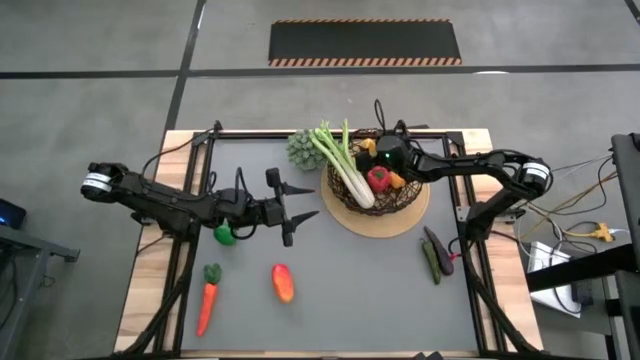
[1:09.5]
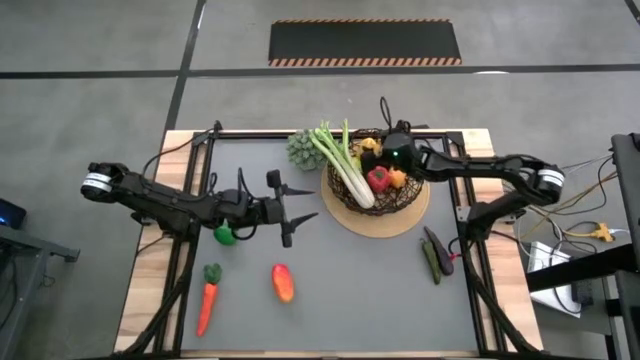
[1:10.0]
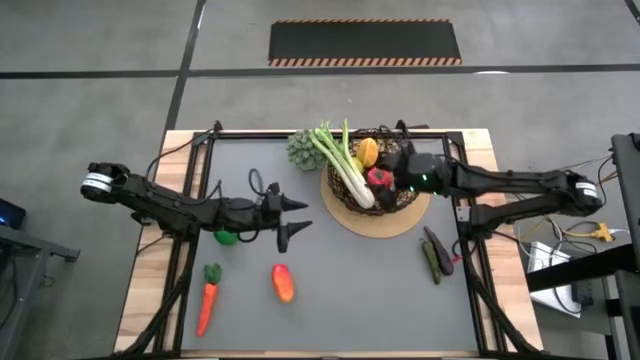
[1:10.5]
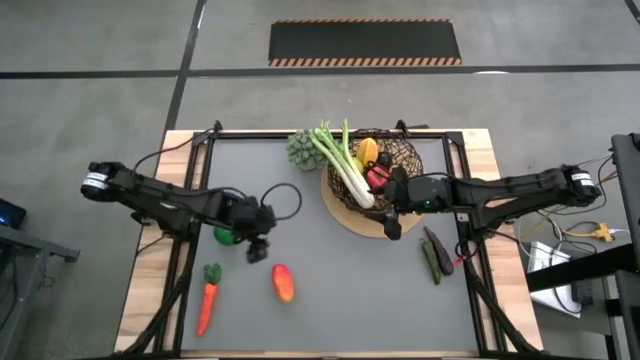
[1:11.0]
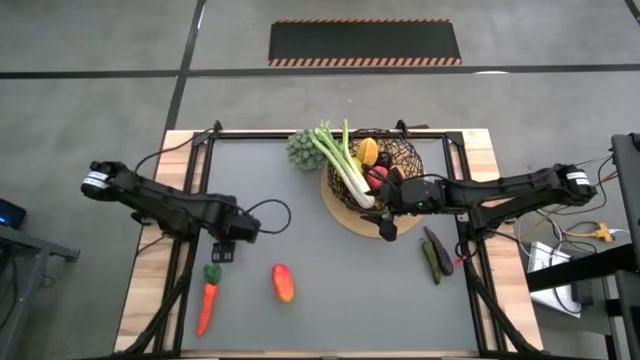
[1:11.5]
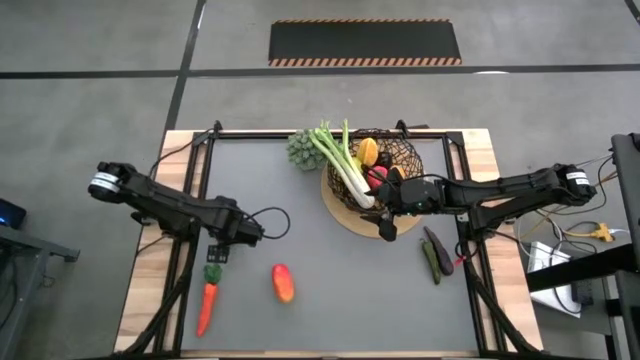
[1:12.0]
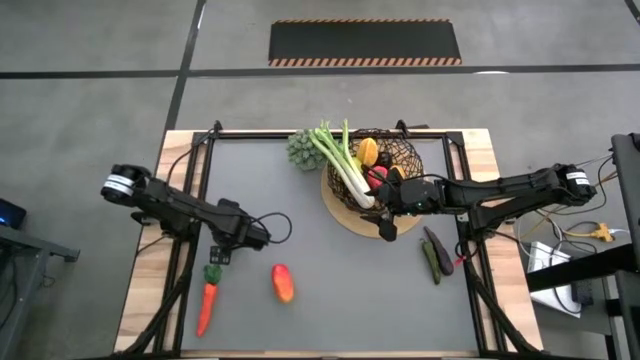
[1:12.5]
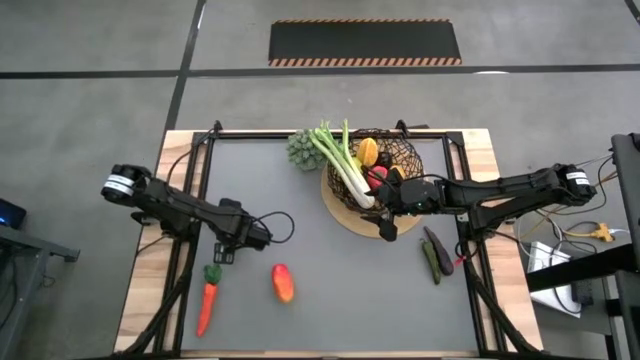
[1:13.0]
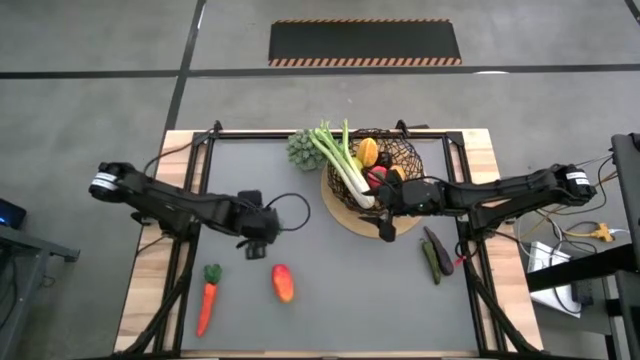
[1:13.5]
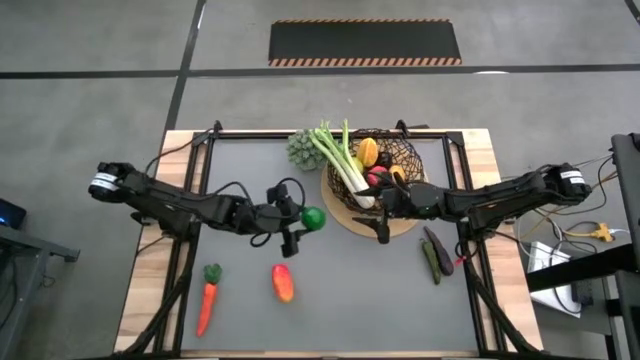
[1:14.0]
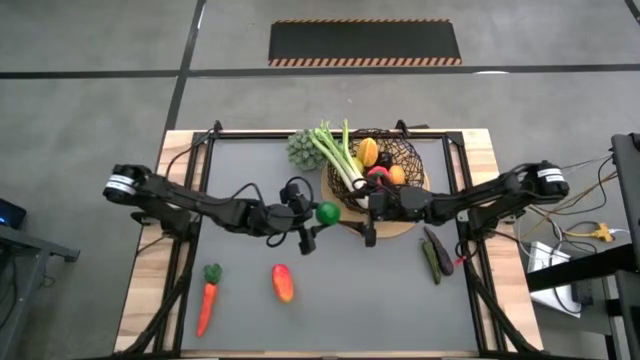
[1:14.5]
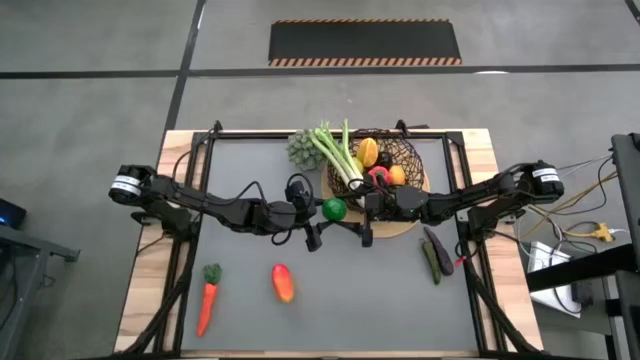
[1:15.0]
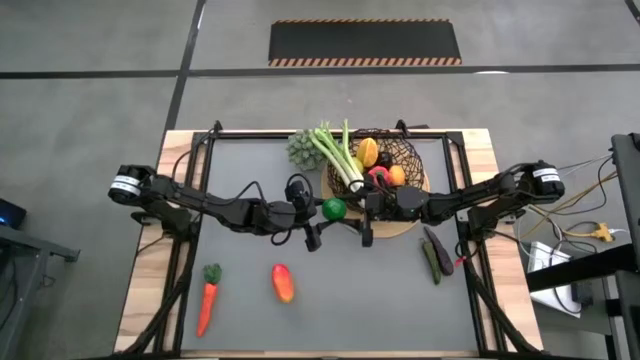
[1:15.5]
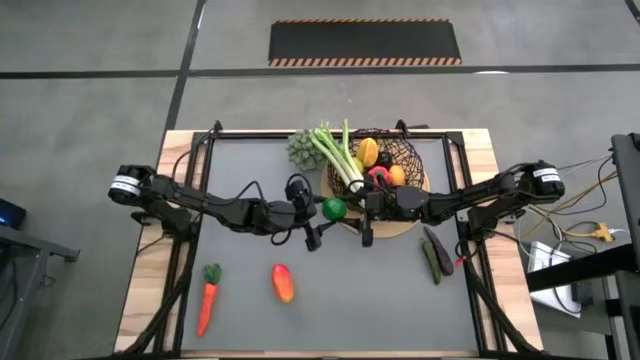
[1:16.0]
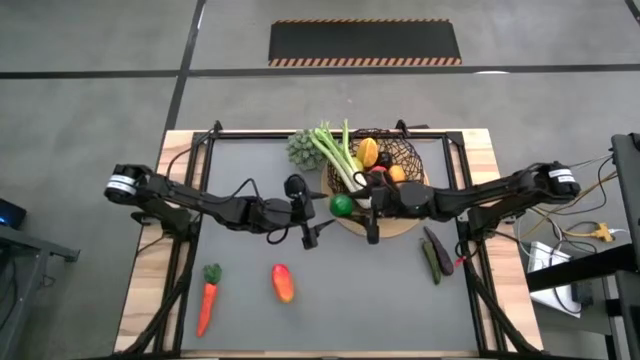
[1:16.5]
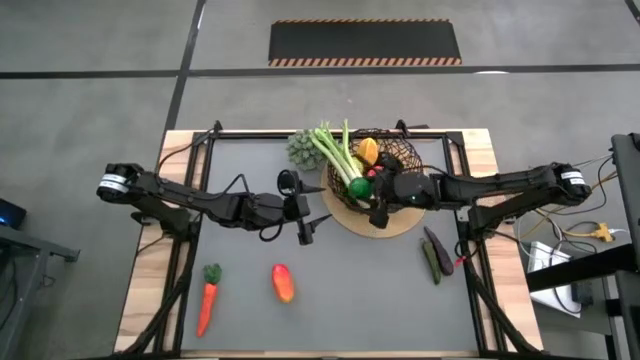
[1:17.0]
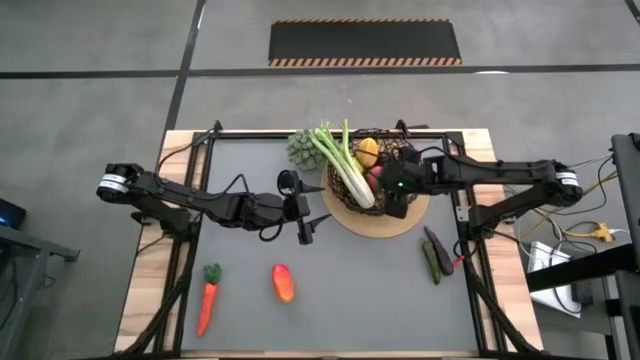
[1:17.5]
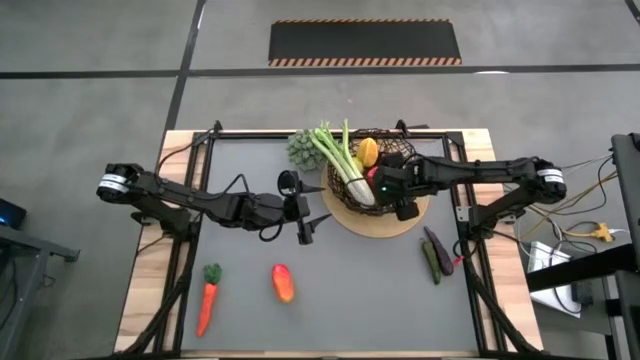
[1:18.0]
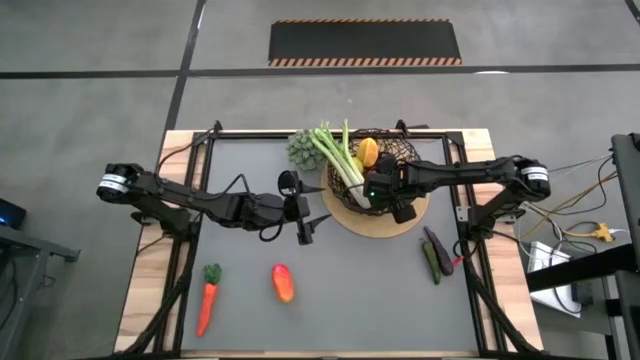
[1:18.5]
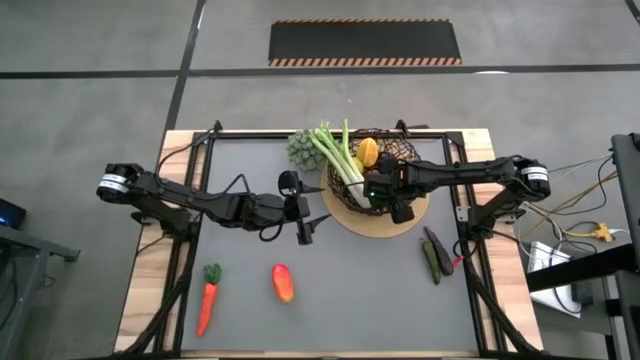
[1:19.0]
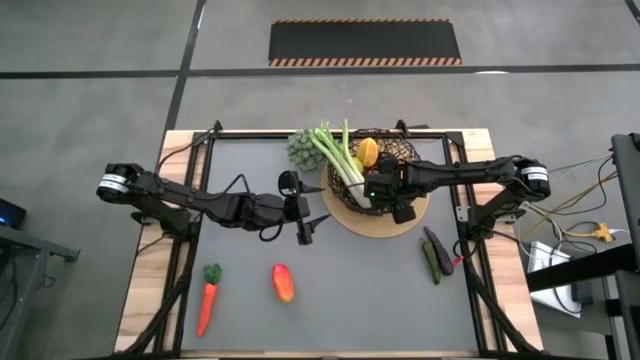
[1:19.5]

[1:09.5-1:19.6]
Task: Build produce basket
Put the green lime into the black wire basket

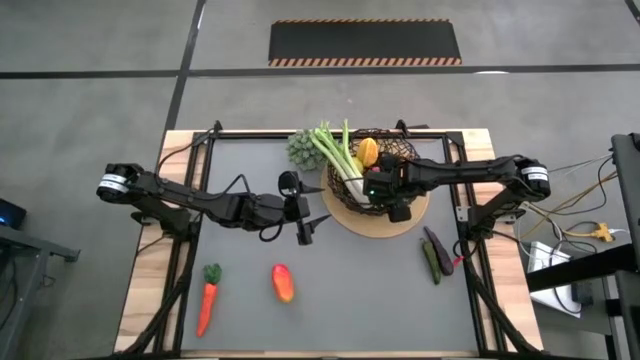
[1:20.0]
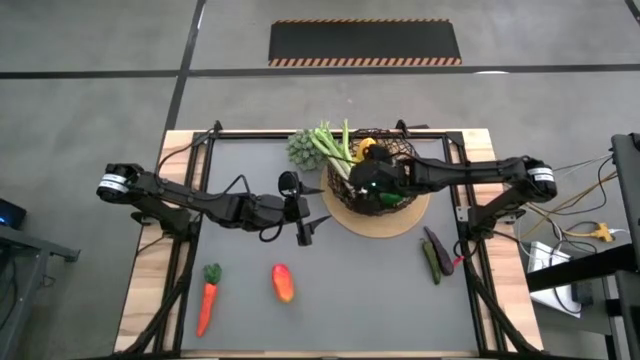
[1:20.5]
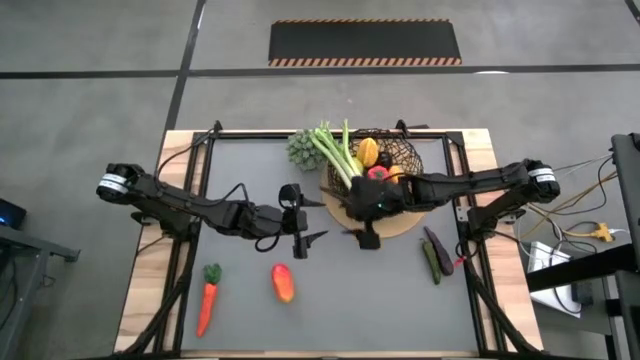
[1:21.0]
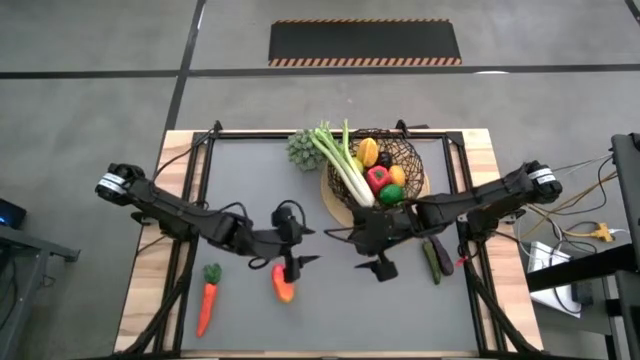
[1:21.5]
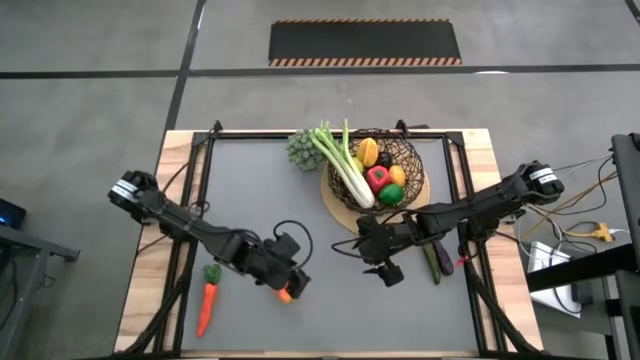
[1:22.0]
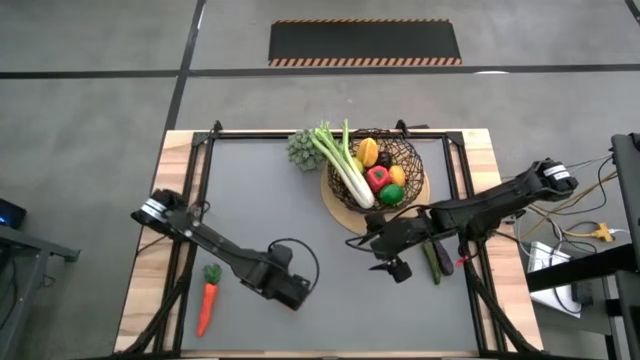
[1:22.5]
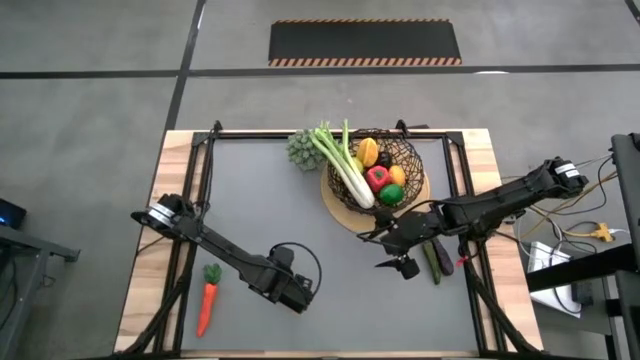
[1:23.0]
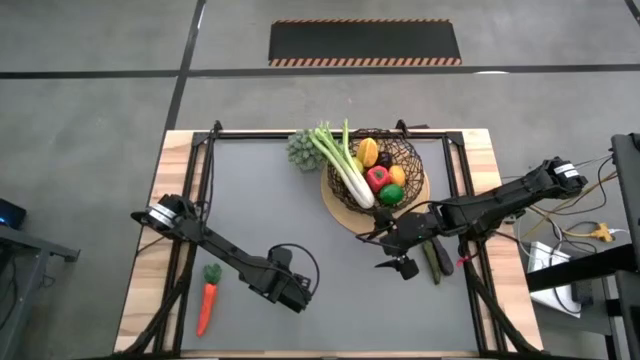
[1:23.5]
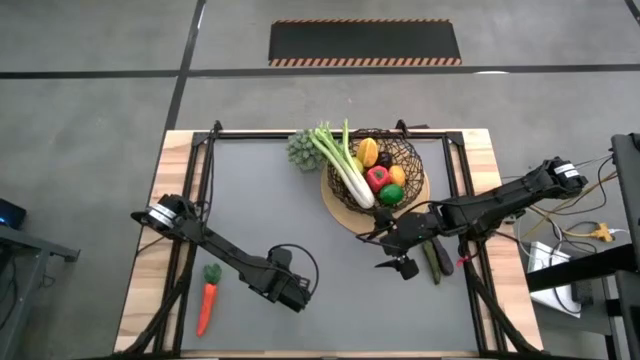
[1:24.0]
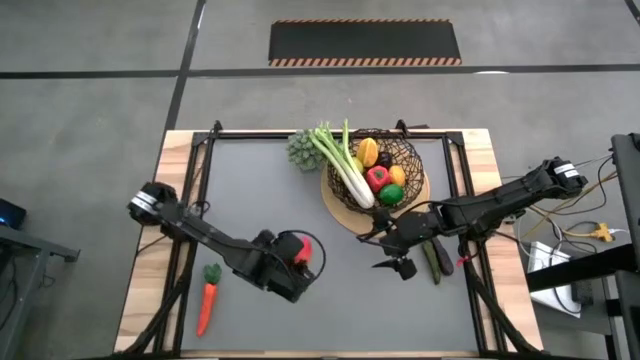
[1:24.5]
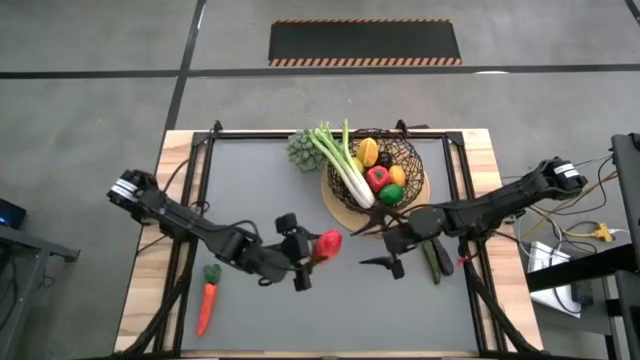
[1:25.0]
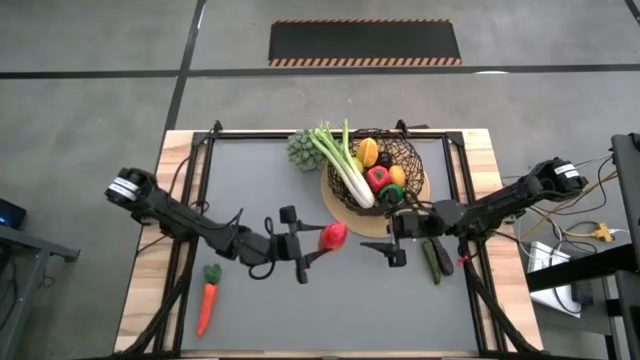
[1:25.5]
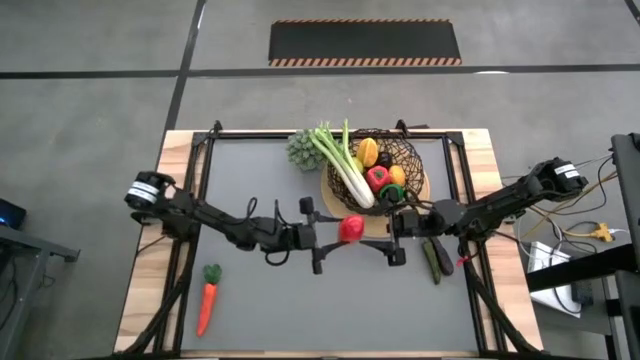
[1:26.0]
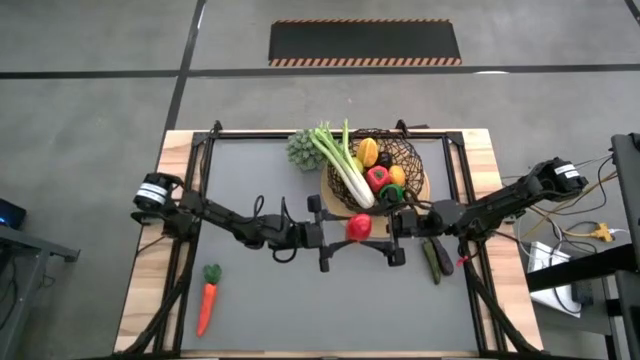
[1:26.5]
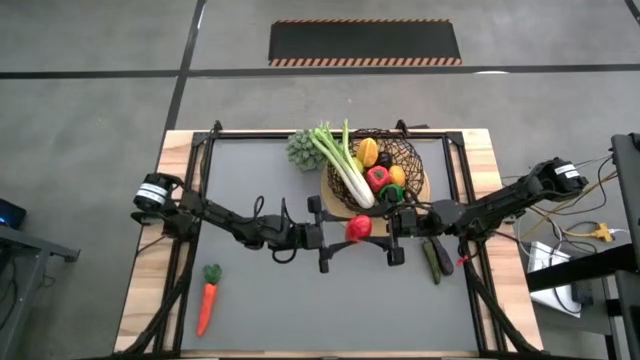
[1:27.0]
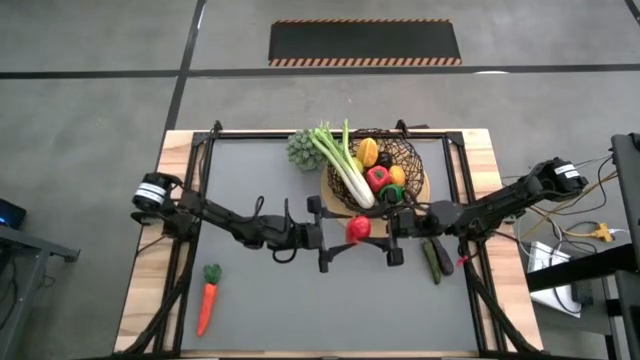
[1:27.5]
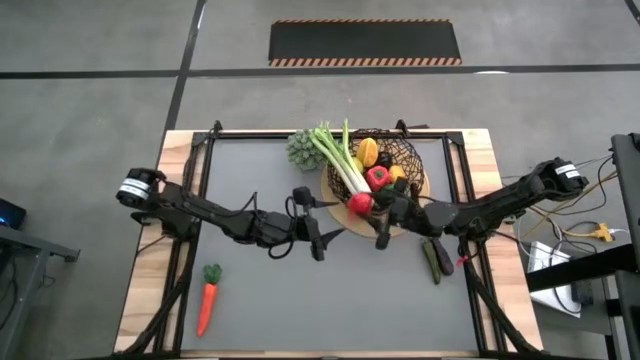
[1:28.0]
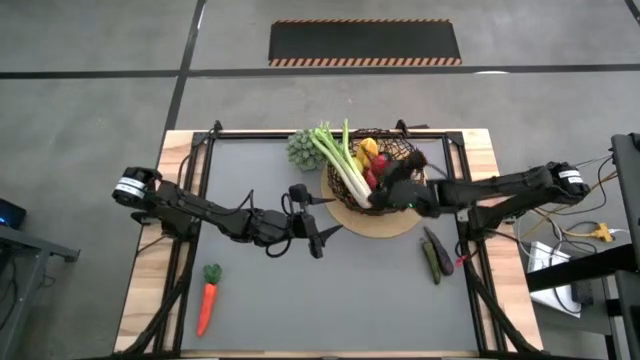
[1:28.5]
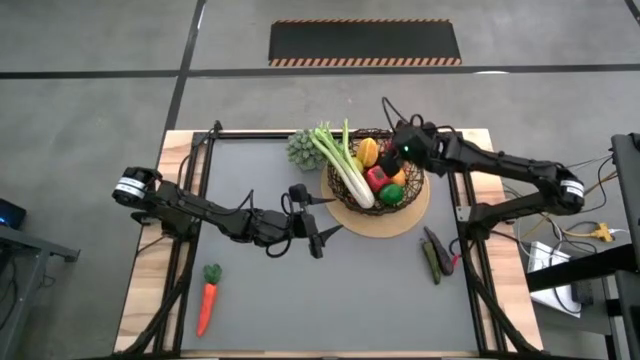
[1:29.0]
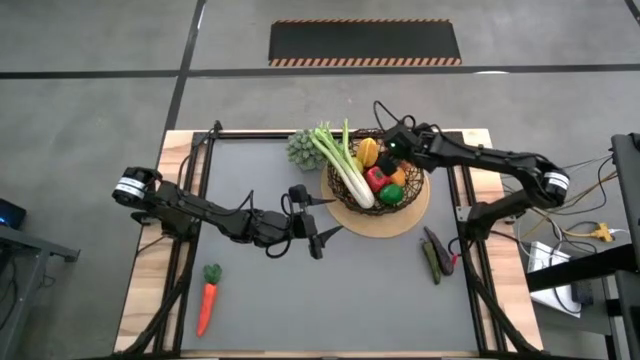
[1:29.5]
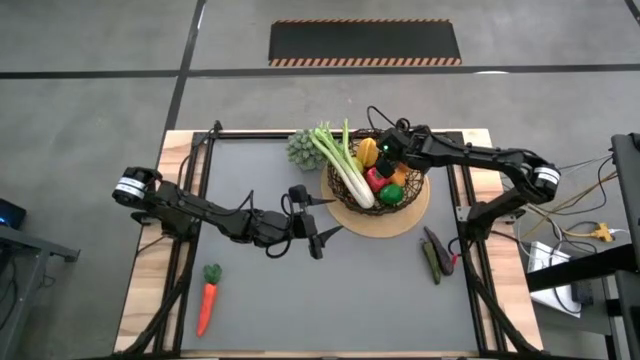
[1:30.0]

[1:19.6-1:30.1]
Put the red mango into the black wire basket
